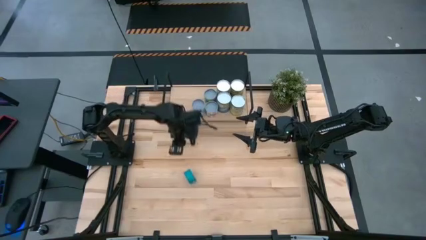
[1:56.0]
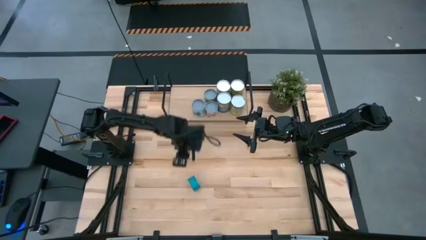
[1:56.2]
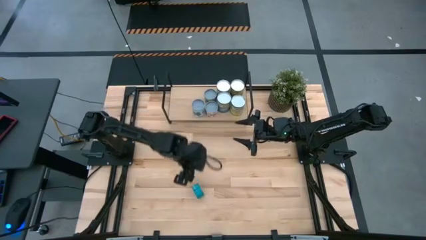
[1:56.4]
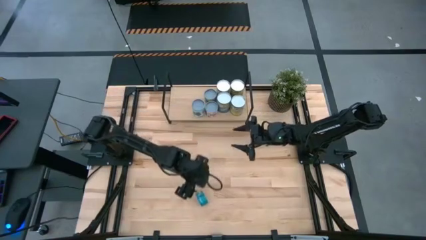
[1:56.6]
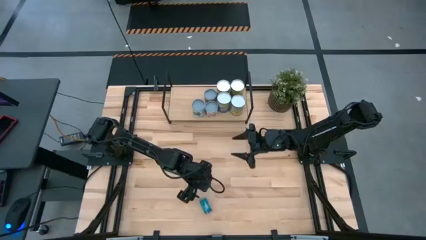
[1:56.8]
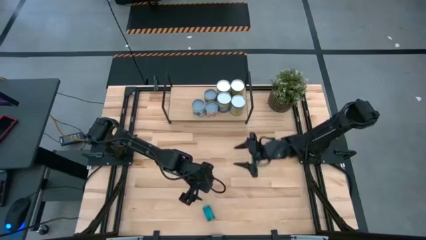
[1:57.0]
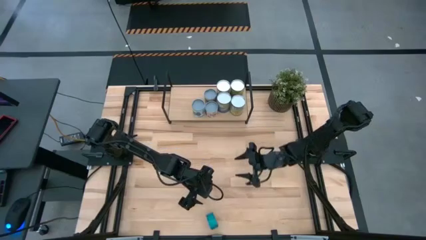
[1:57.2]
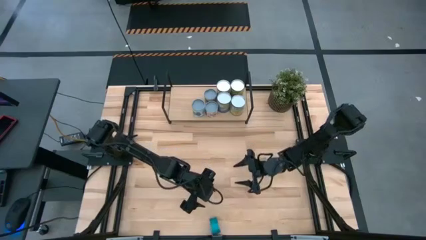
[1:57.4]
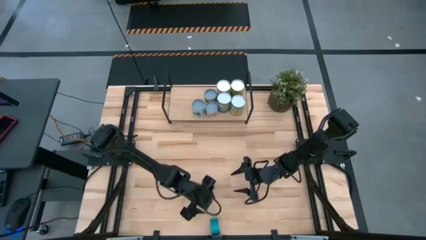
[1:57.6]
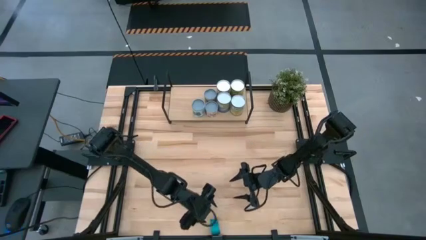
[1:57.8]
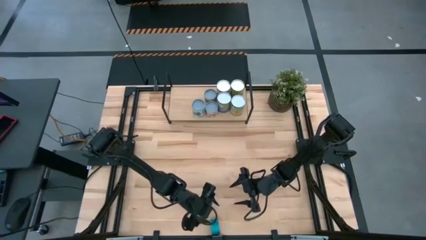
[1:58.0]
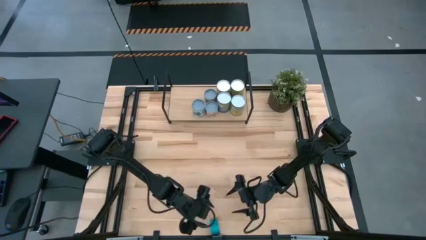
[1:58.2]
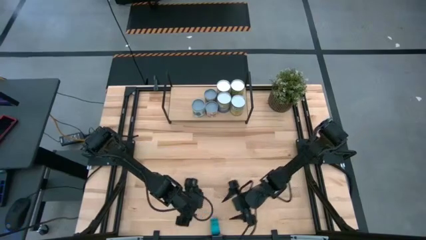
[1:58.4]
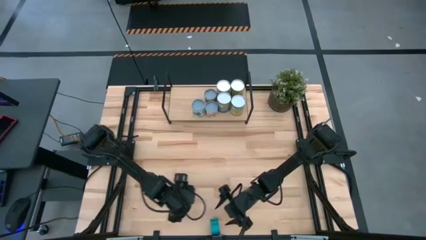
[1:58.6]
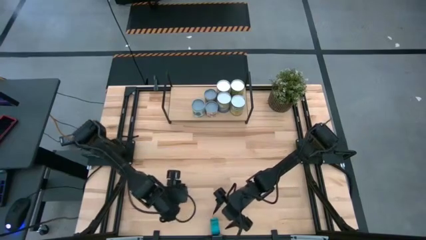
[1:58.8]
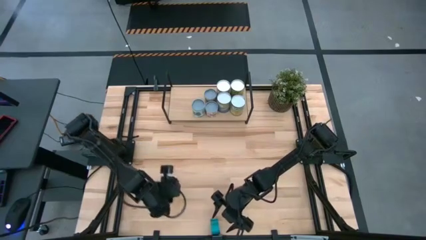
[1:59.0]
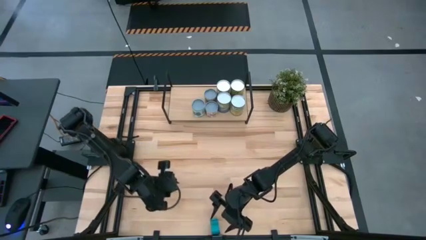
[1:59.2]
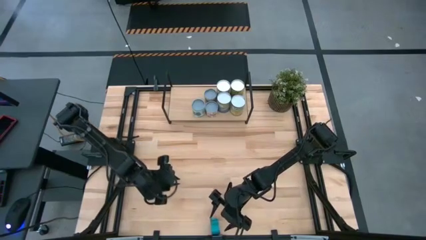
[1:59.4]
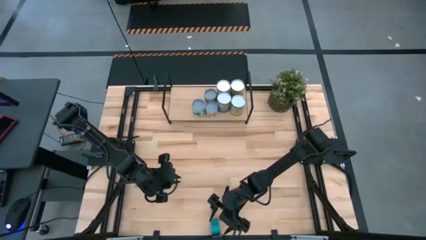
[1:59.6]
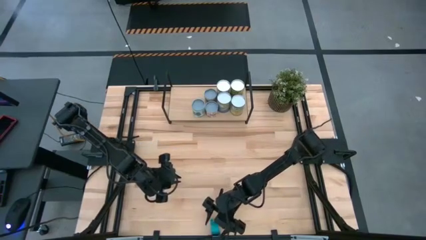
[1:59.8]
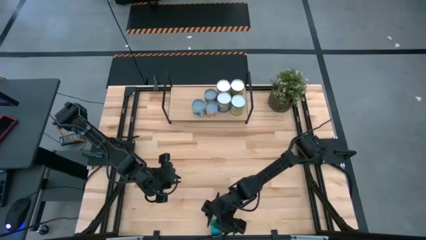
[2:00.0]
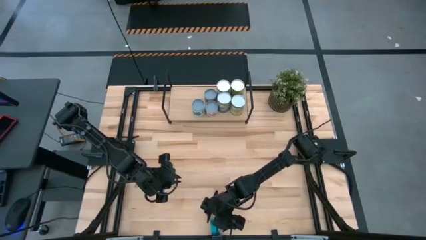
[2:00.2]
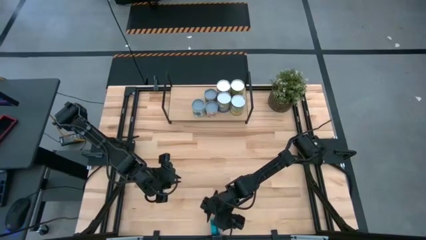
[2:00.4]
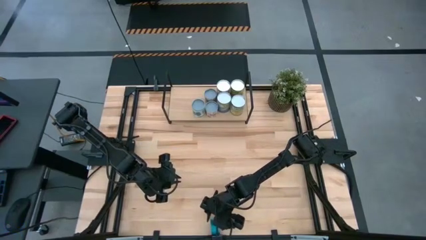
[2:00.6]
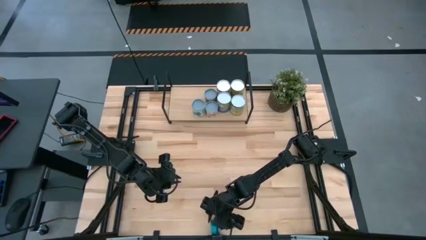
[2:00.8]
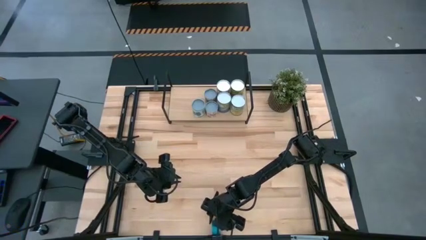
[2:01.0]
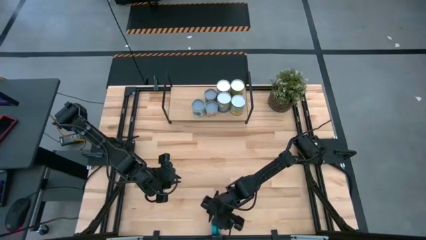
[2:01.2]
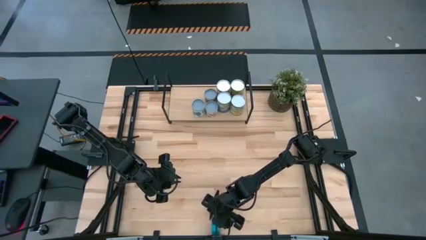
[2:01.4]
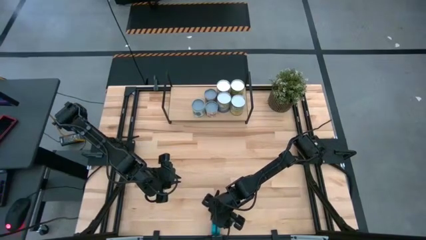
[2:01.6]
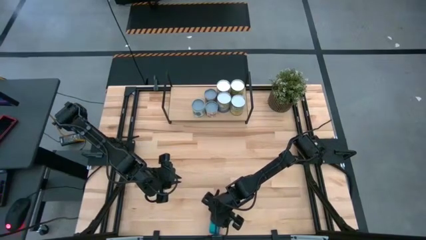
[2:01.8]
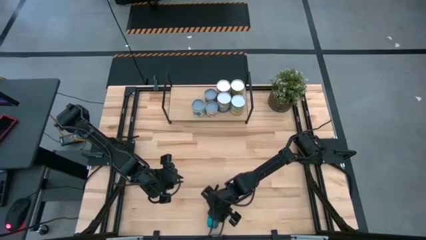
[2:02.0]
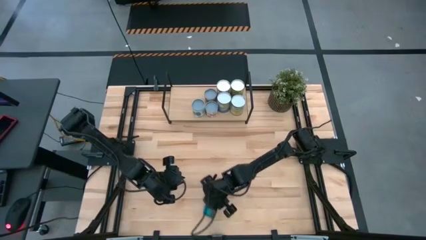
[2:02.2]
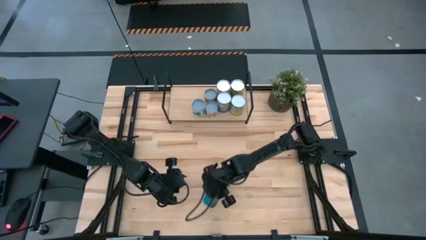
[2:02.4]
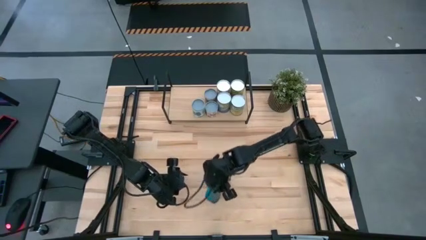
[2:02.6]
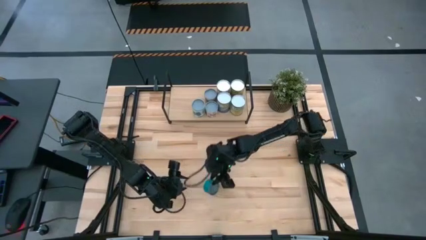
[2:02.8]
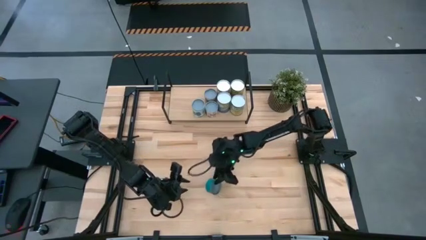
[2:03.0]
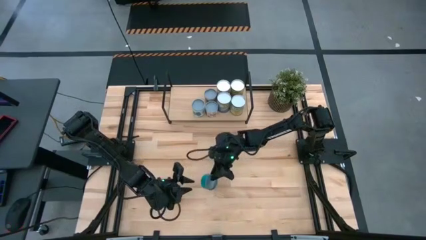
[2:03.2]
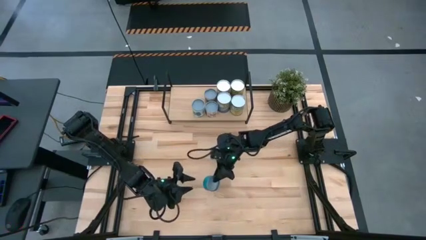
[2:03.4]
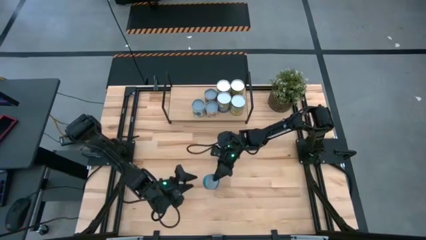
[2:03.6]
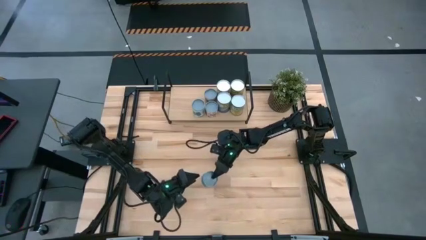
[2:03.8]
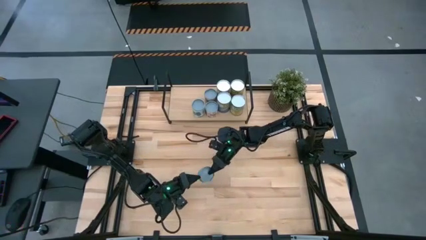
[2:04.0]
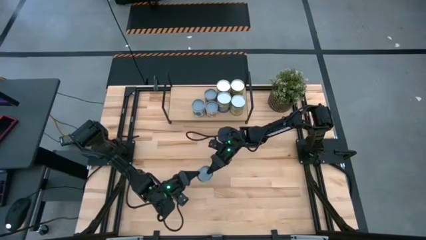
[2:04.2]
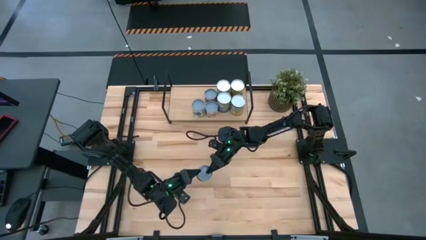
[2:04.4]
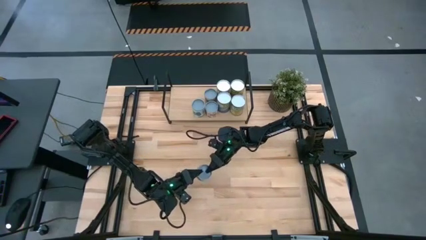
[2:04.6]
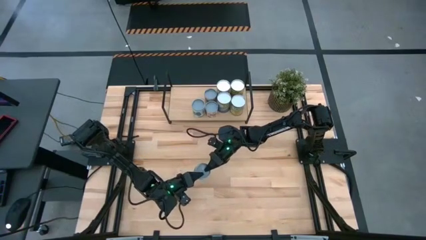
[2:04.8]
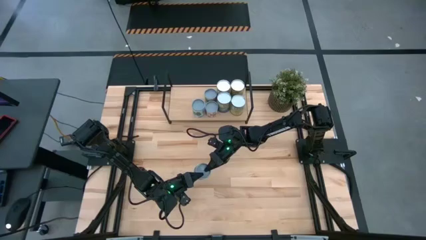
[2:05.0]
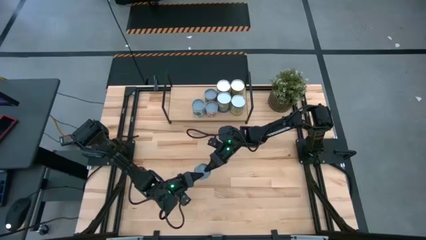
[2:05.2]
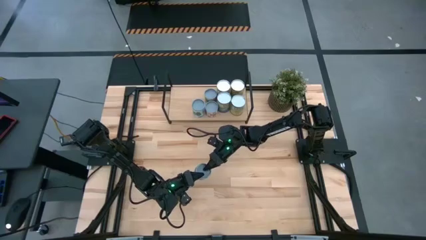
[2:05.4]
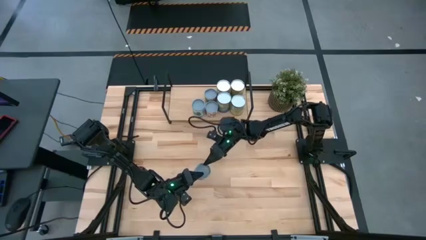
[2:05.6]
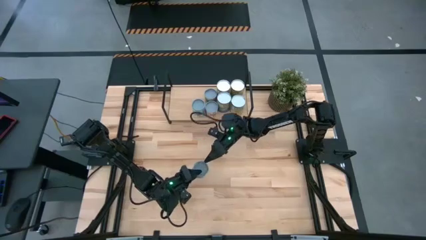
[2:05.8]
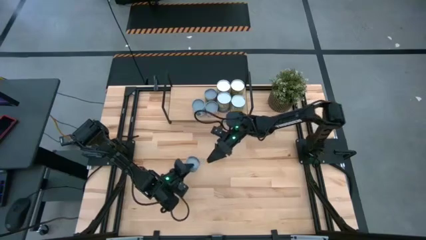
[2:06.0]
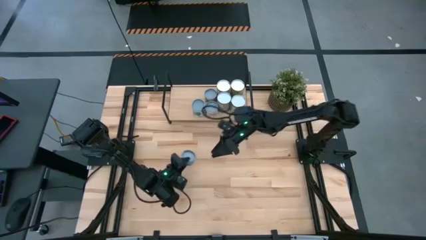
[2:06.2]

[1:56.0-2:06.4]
Task: Pick and place cans onto a shelf
Put the green tuna can on the shelf
